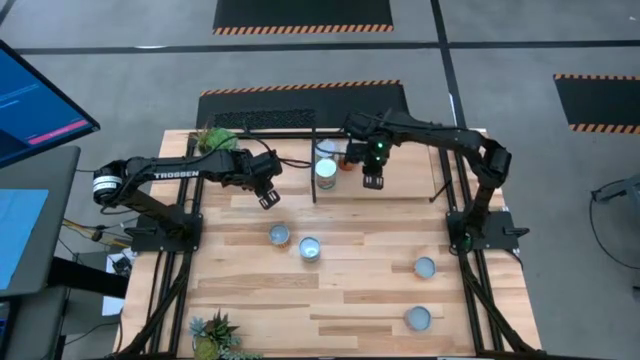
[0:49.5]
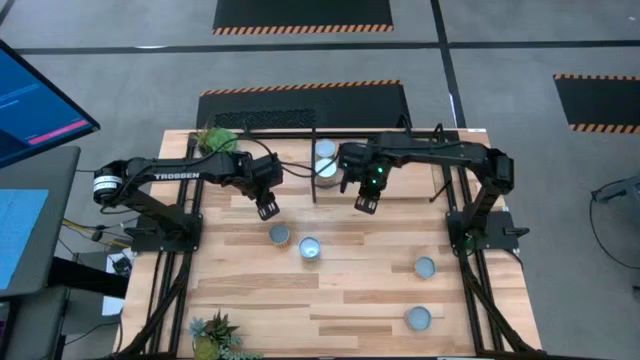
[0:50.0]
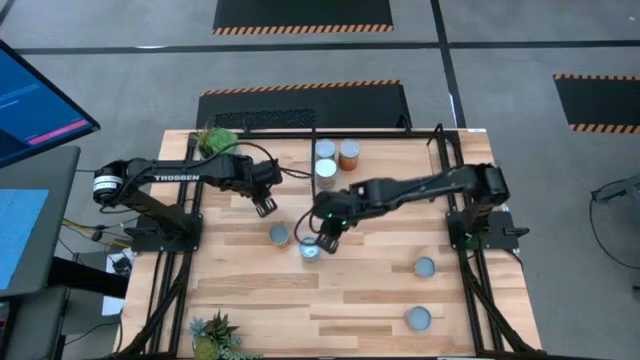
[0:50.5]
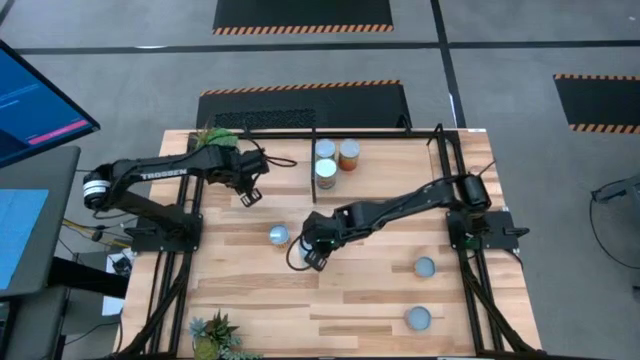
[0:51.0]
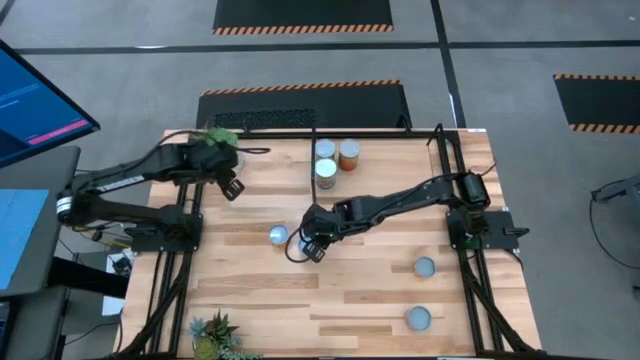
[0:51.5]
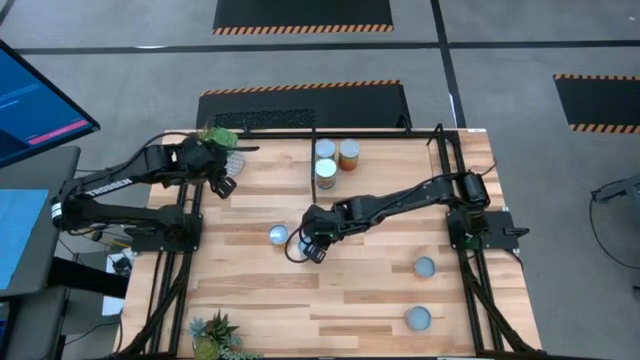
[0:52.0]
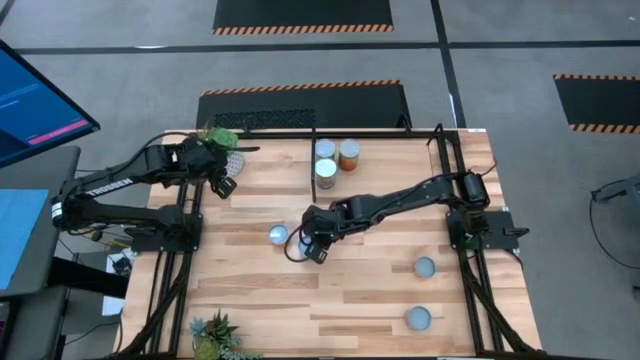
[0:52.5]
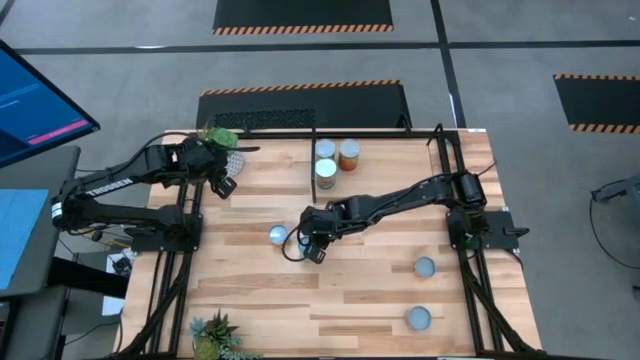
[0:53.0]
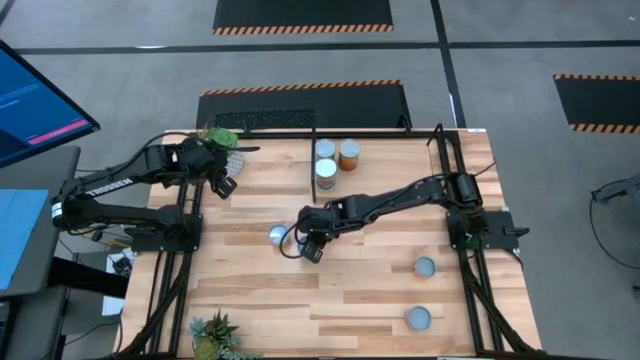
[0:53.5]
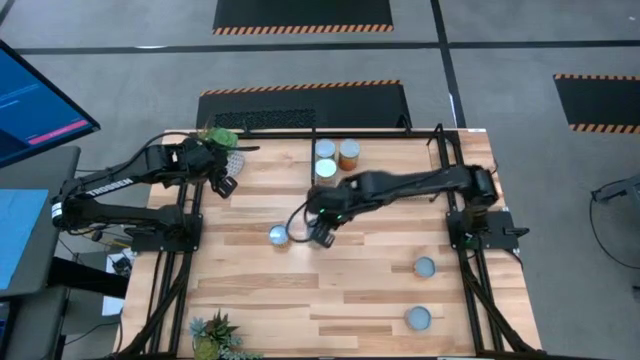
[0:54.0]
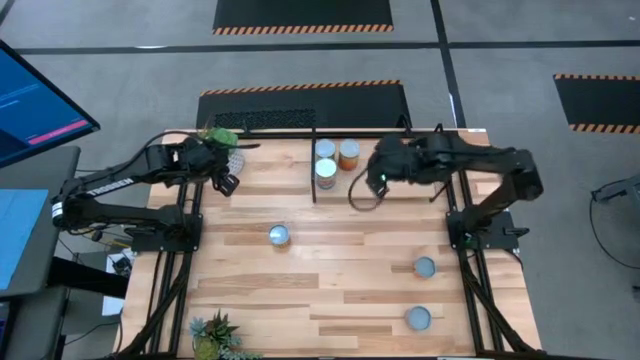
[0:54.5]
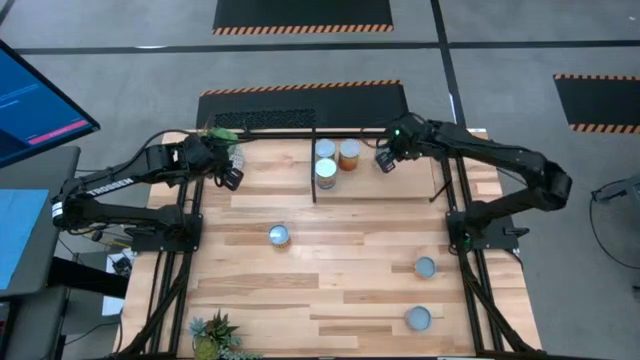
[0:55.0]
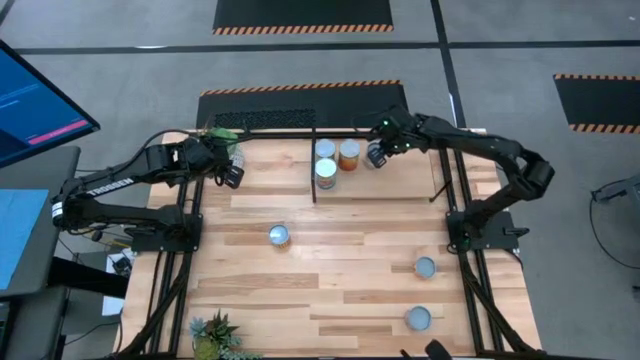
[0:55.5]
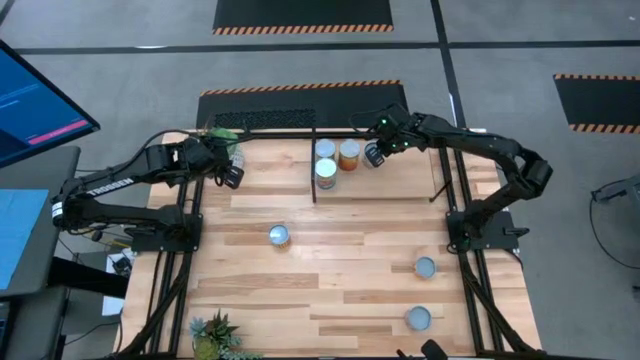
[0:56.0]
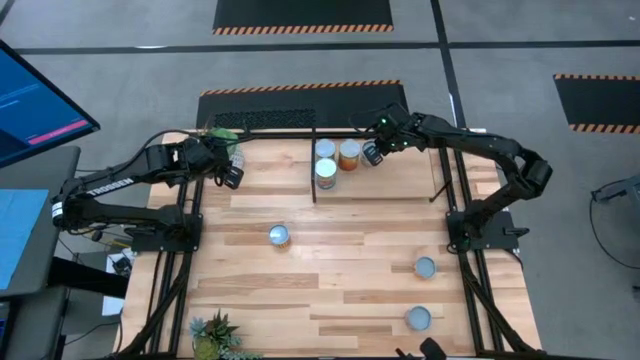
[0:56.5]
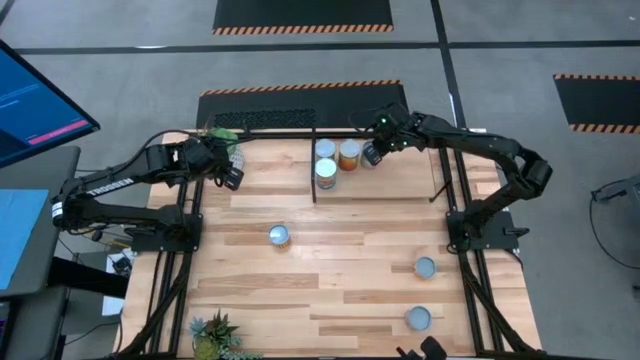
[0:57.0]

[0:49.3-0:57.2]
Task: Pick and place cans onto a shelf
Put the canned chicken soup on the shelf

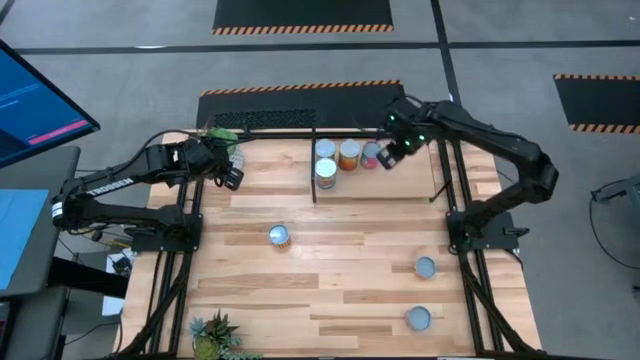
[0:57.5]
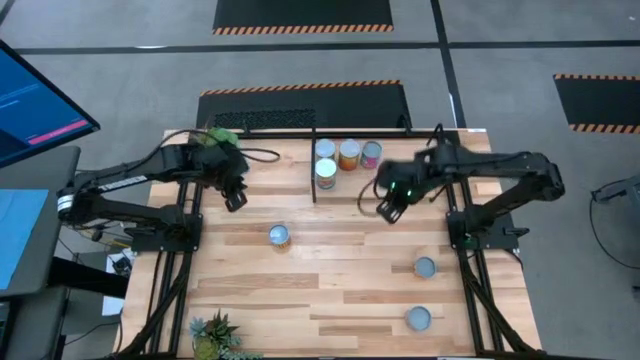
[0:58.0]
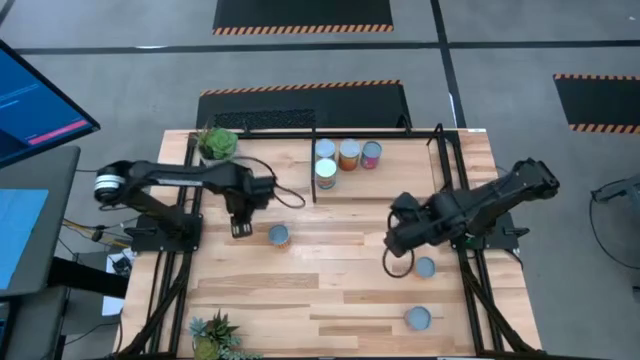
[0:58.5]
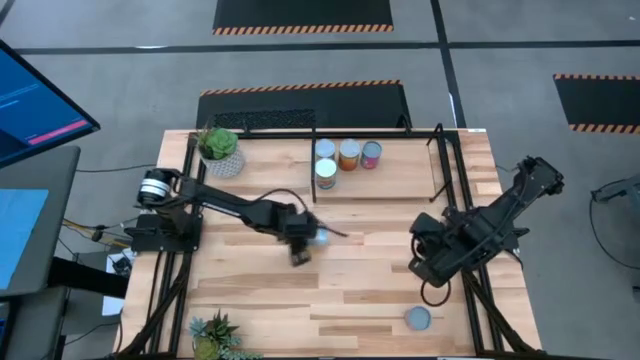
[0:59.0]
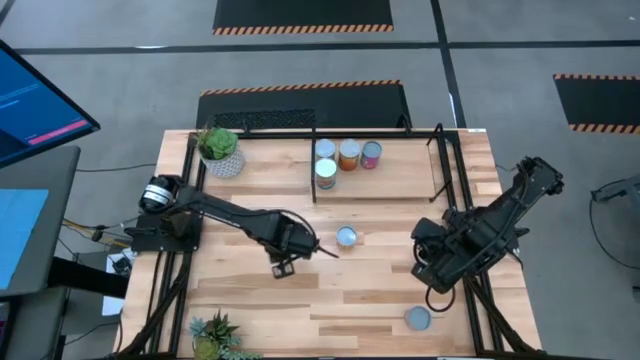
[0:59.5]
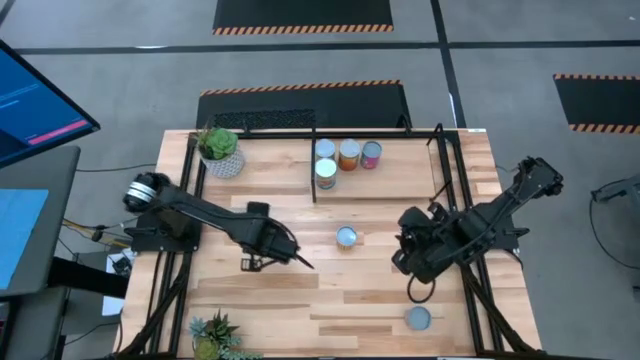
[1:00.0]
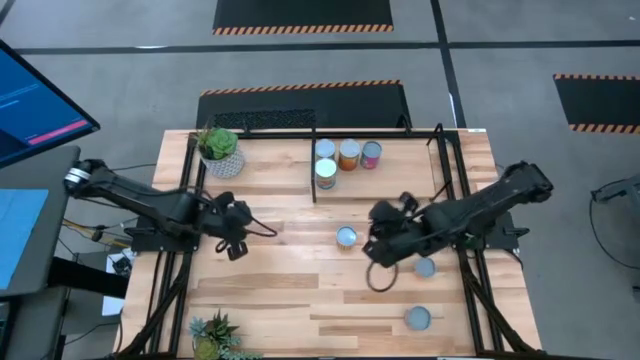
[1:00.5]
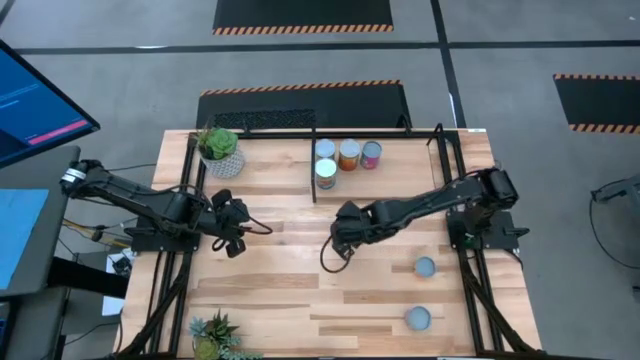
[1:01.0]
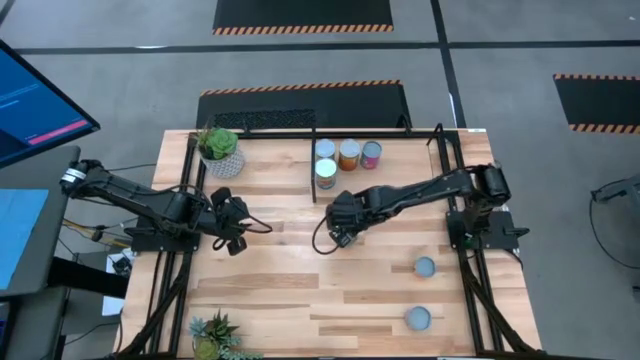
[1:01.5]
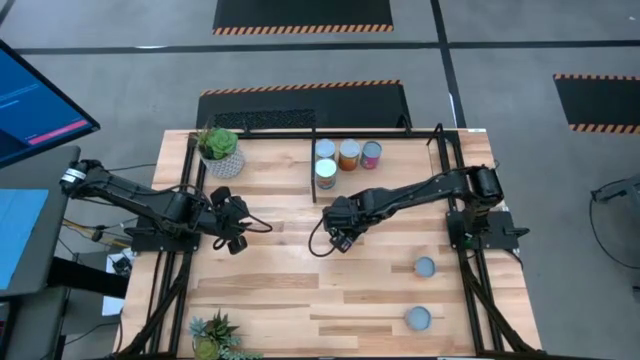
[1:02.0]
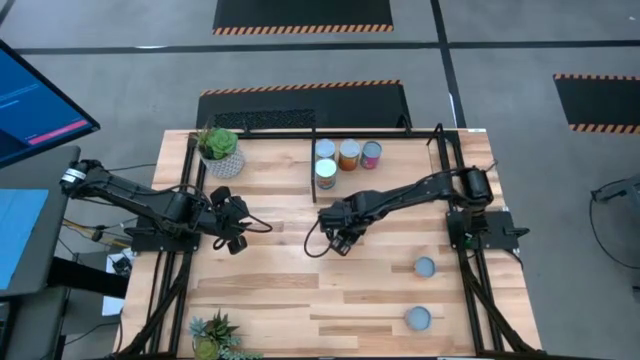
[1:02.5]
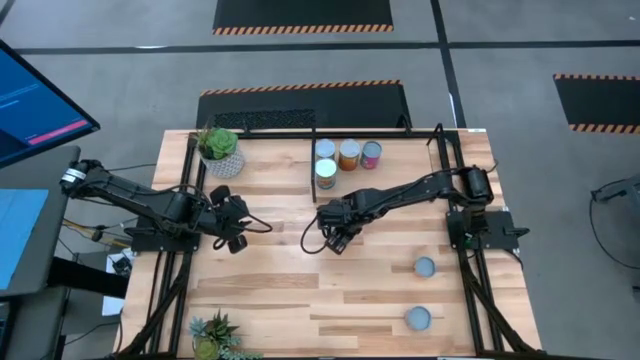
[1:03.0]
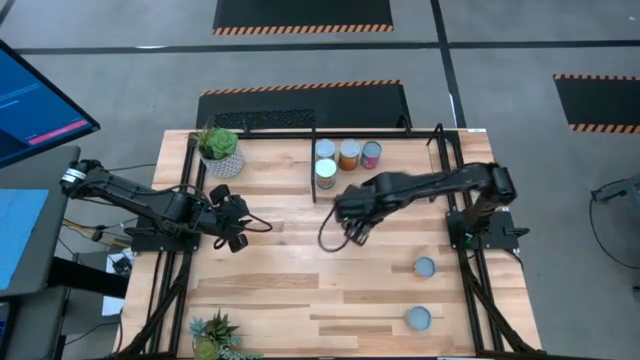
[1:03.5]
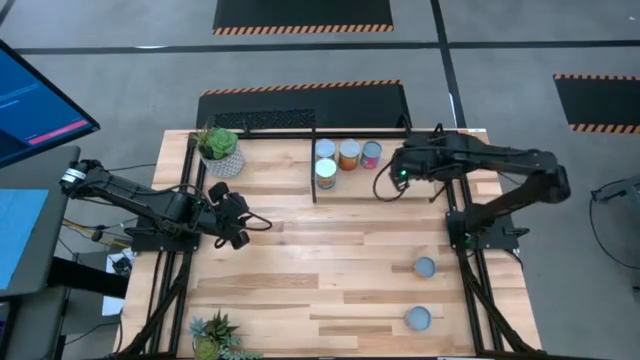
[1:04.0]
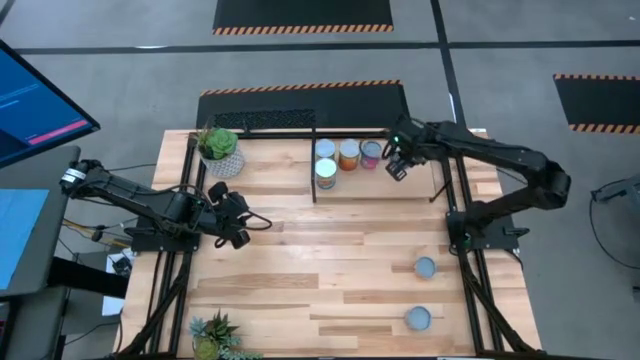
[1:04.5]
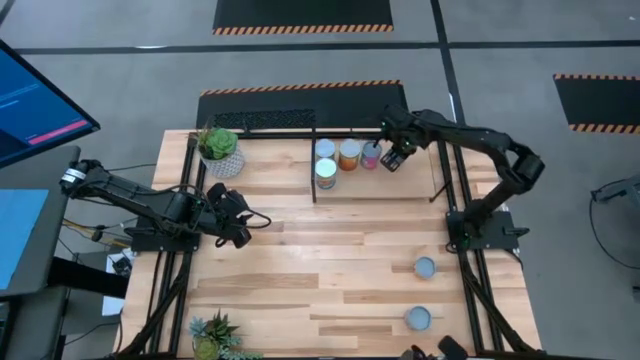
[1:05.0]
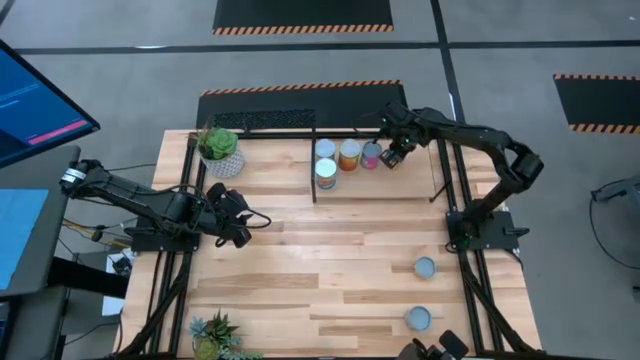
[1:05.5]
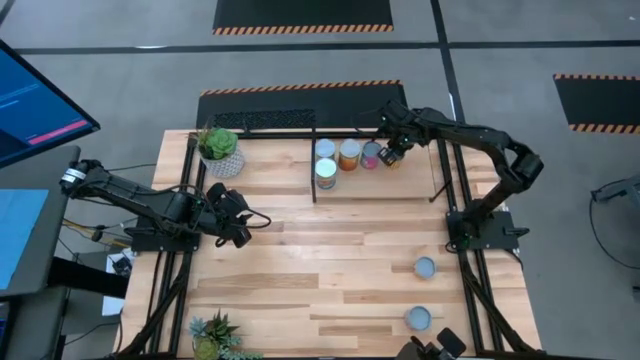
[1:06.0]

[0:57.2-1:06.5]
Put the canned black beans on the shelf

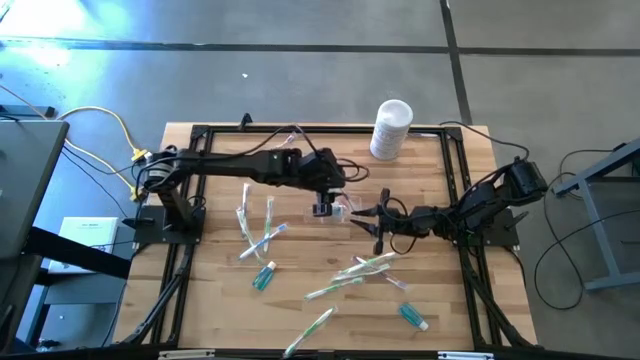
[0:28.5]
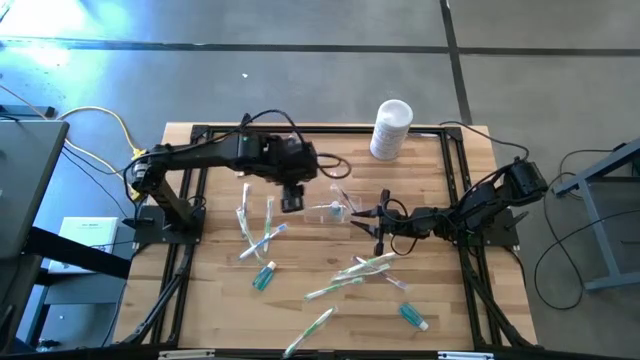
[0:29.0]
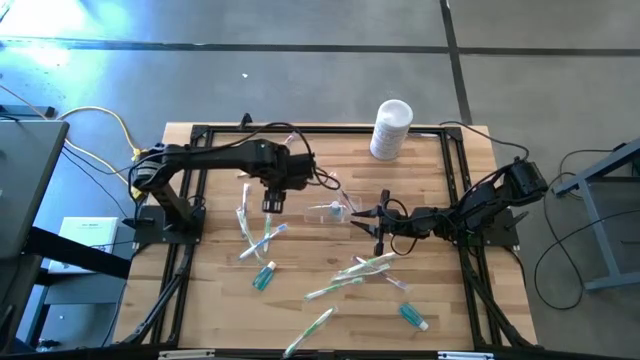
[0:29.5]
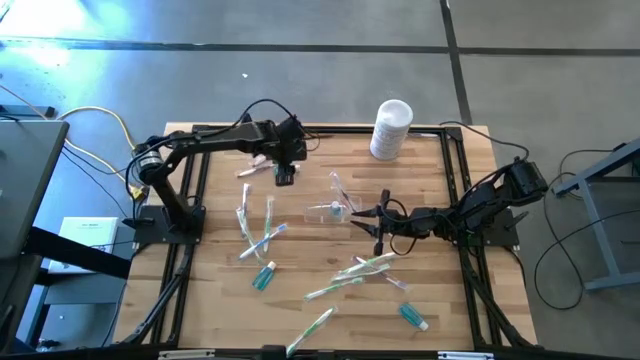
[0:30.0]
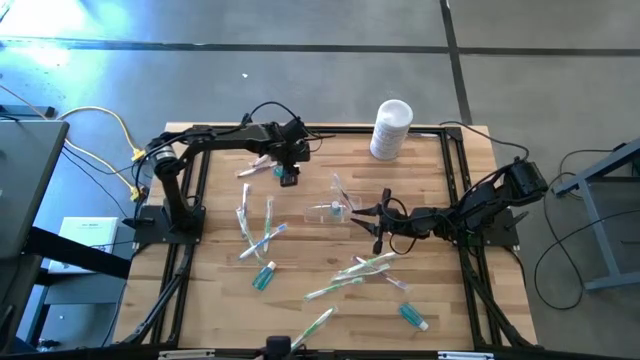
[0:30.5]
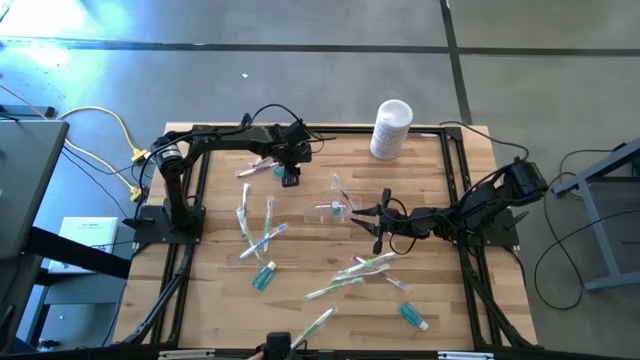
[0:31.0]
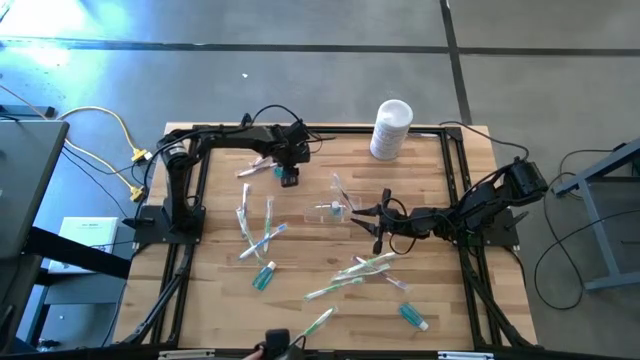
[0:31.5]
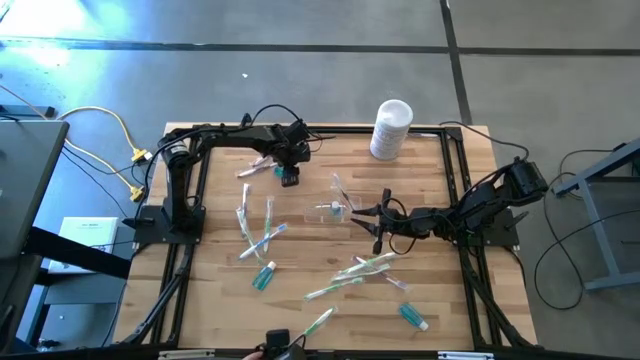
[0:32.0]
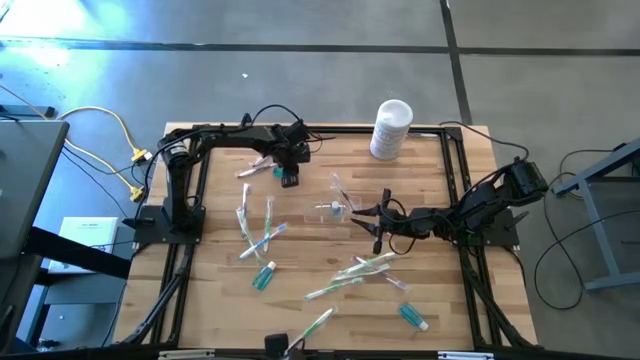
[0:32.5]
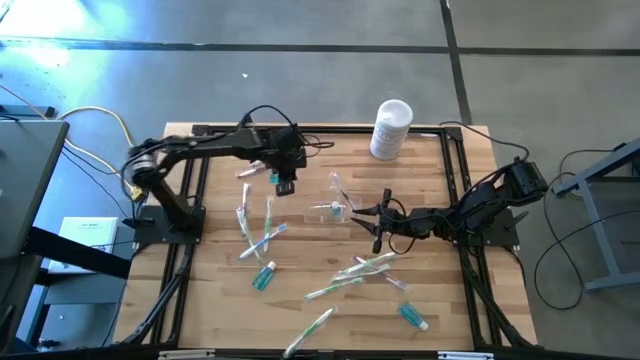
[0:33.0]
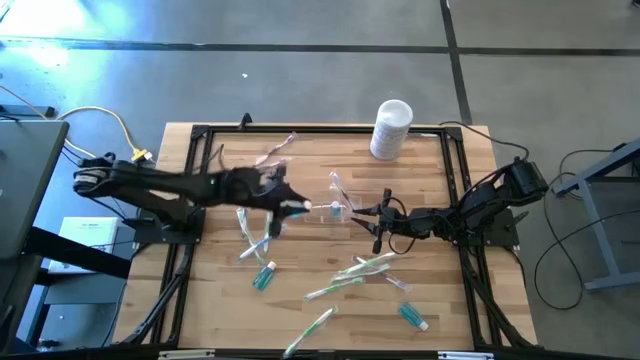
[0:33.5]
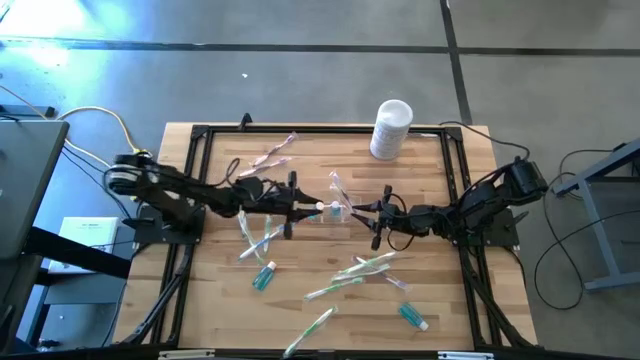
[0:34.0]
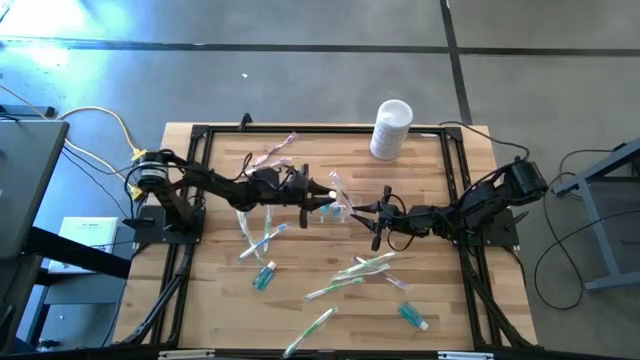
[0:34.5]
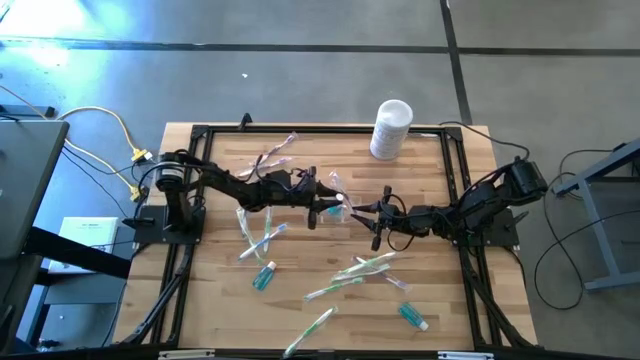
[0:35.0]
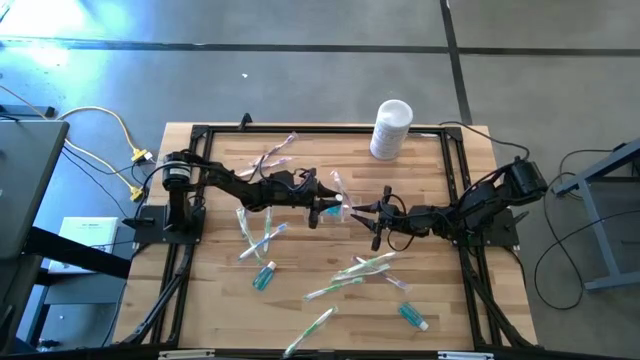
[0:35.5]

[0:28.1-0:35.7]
Task: Pick & Place toothbrushing station
Put the blue mouthwash bottle into the transparent organizer
